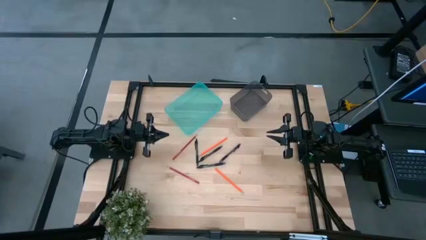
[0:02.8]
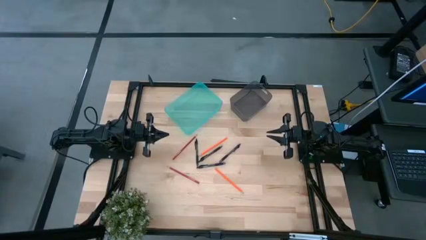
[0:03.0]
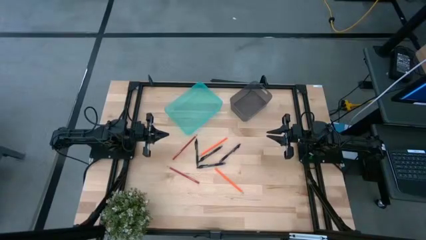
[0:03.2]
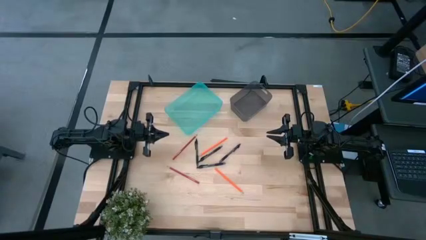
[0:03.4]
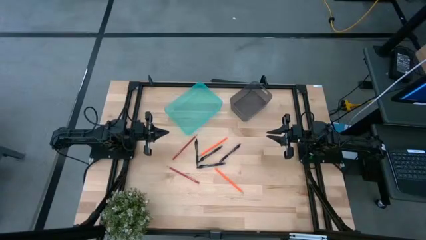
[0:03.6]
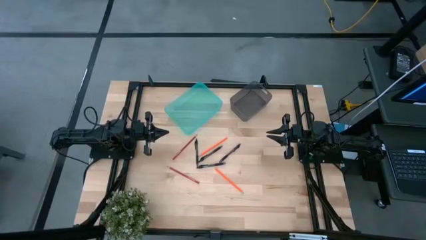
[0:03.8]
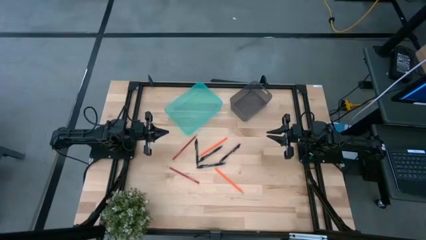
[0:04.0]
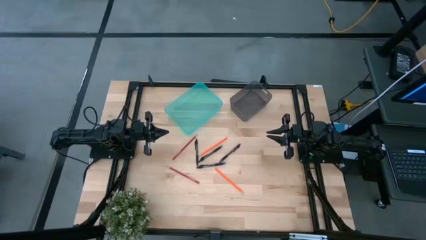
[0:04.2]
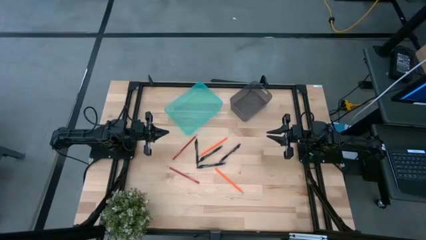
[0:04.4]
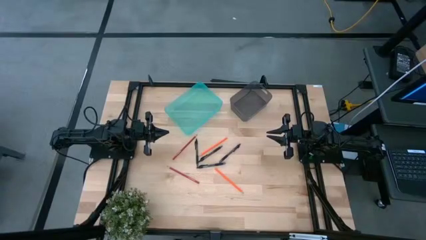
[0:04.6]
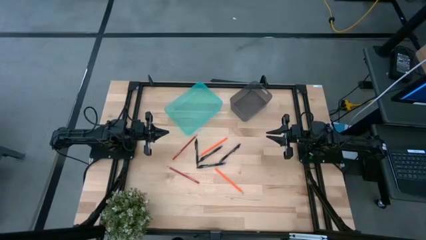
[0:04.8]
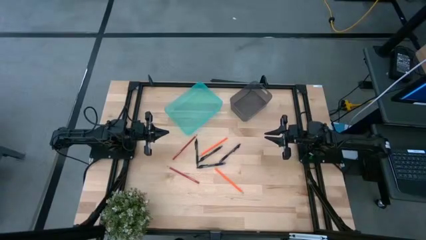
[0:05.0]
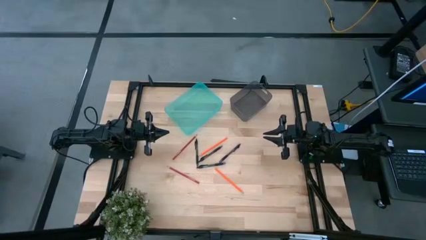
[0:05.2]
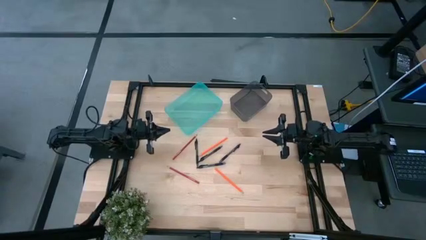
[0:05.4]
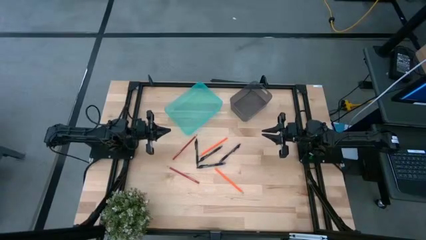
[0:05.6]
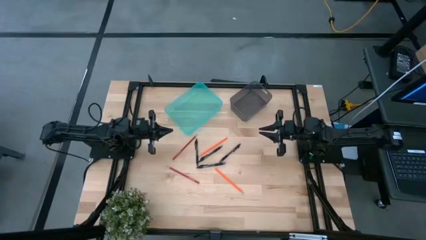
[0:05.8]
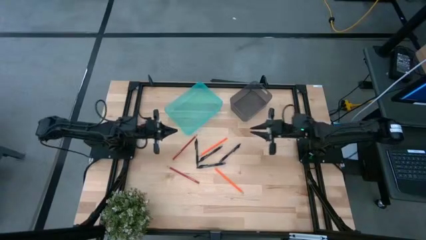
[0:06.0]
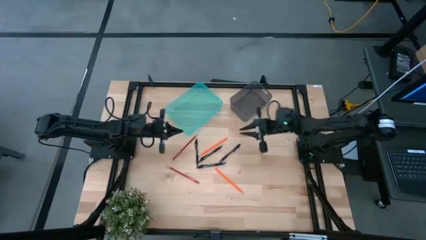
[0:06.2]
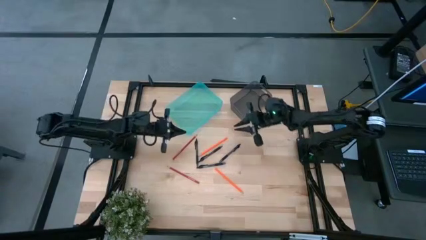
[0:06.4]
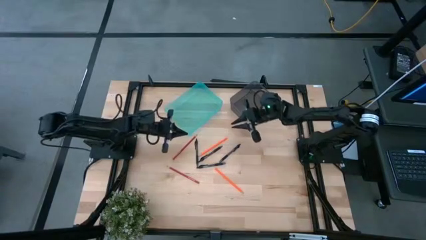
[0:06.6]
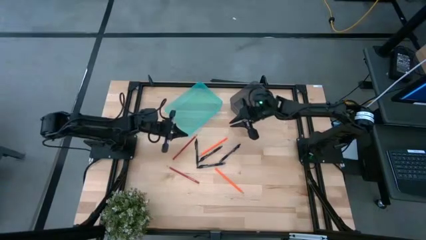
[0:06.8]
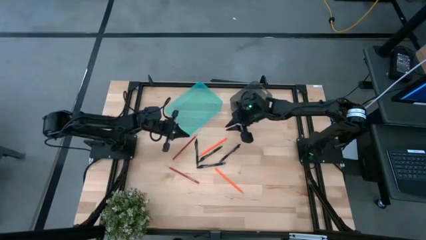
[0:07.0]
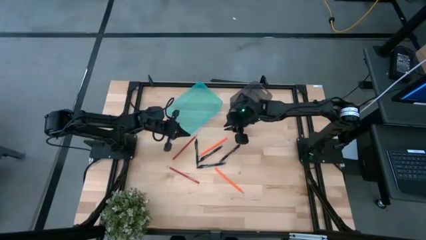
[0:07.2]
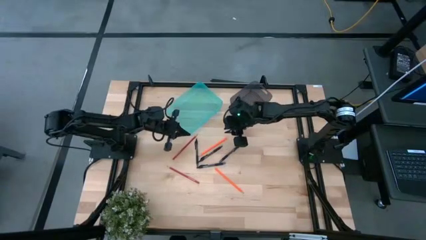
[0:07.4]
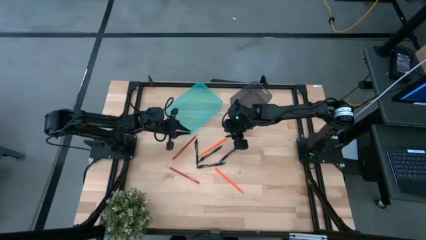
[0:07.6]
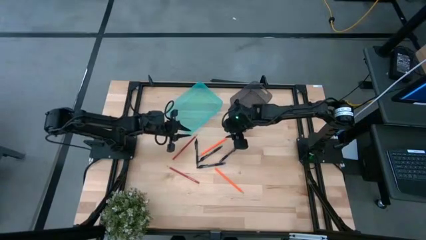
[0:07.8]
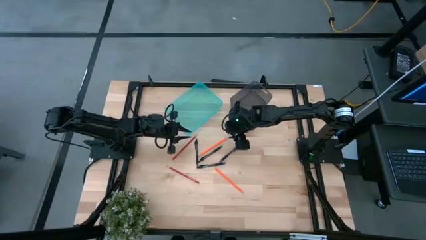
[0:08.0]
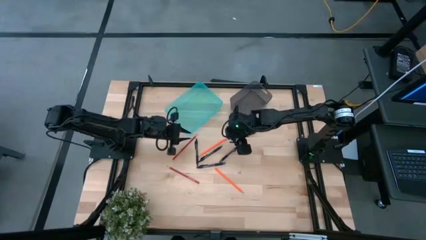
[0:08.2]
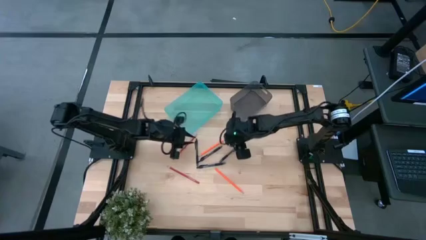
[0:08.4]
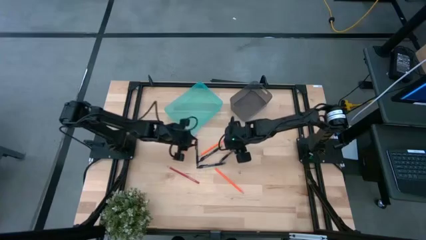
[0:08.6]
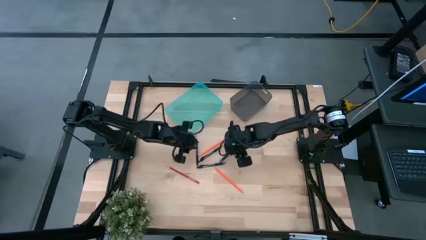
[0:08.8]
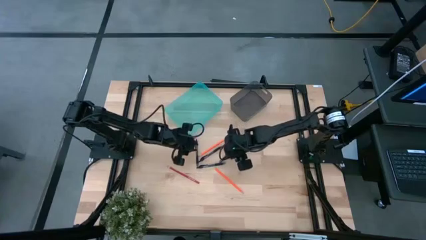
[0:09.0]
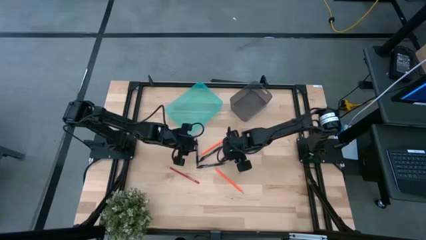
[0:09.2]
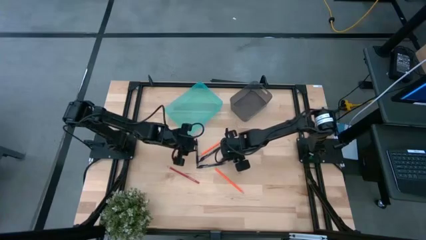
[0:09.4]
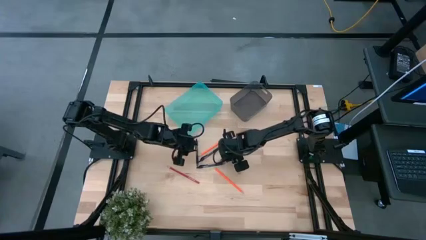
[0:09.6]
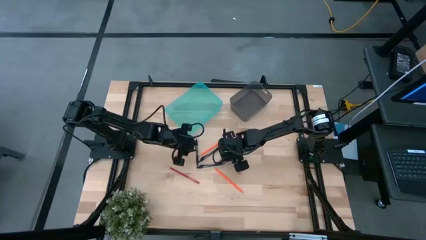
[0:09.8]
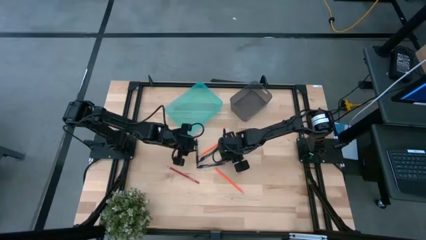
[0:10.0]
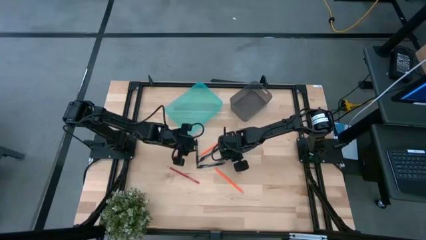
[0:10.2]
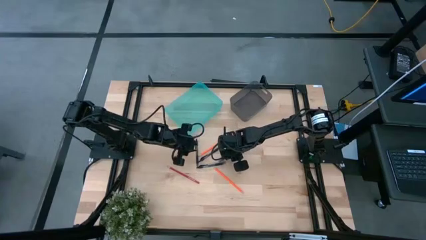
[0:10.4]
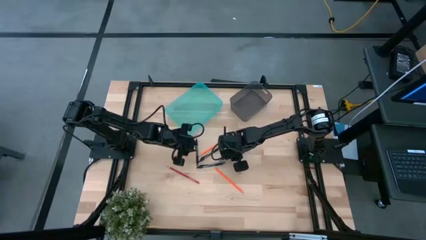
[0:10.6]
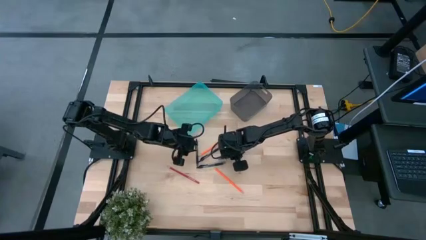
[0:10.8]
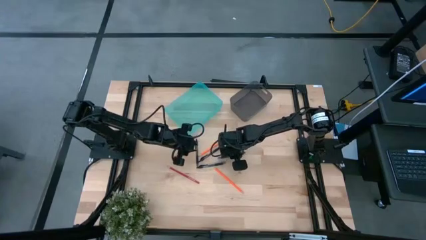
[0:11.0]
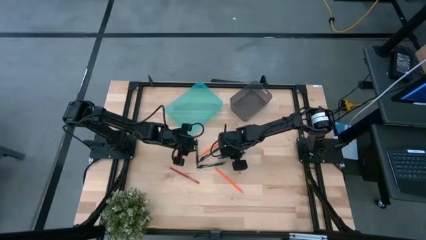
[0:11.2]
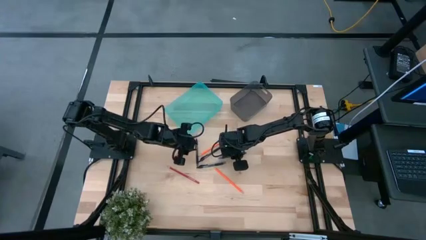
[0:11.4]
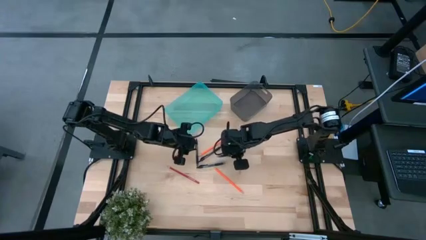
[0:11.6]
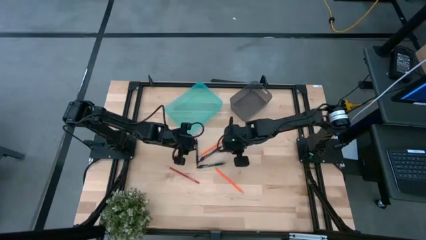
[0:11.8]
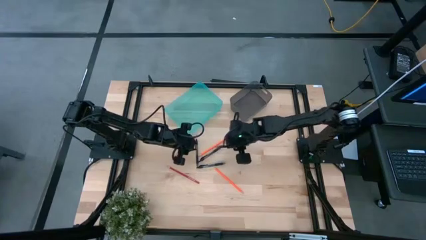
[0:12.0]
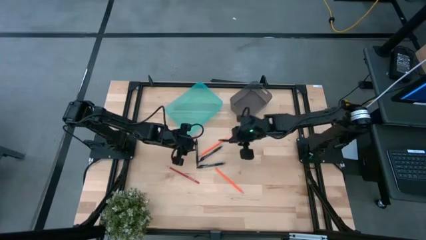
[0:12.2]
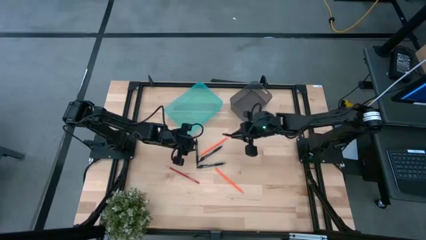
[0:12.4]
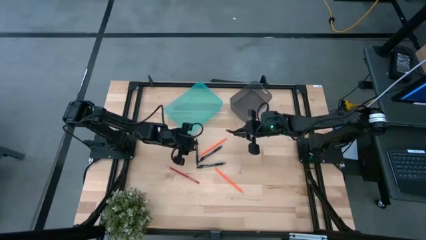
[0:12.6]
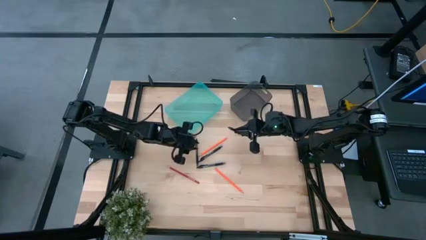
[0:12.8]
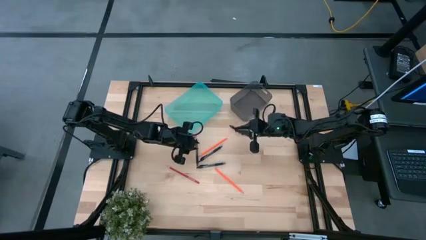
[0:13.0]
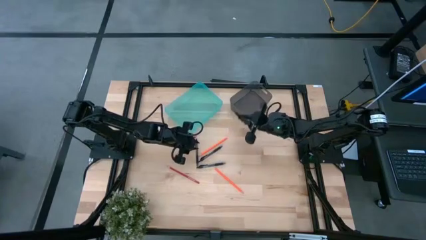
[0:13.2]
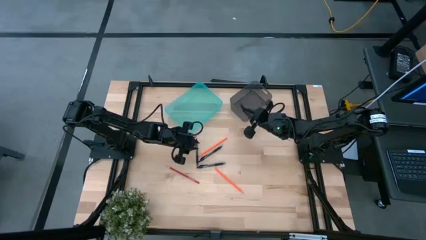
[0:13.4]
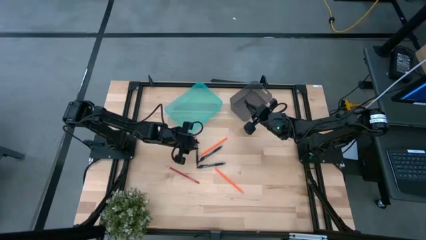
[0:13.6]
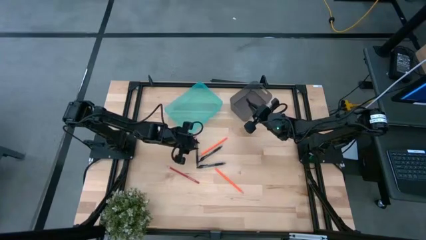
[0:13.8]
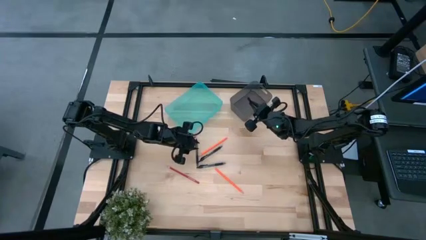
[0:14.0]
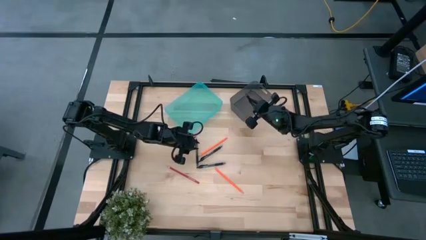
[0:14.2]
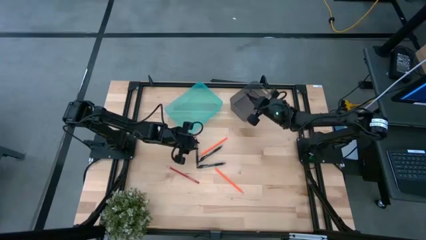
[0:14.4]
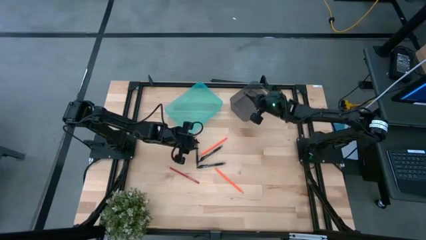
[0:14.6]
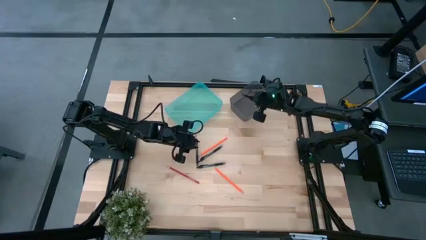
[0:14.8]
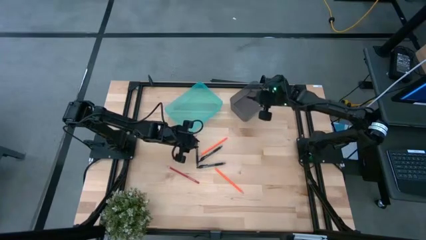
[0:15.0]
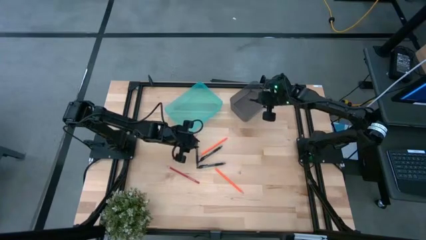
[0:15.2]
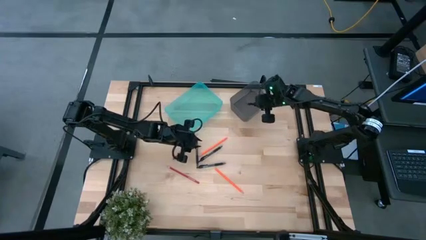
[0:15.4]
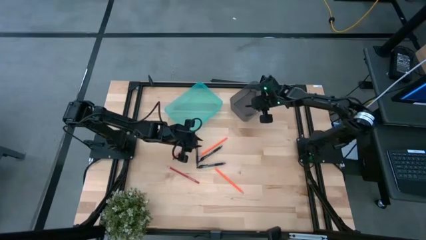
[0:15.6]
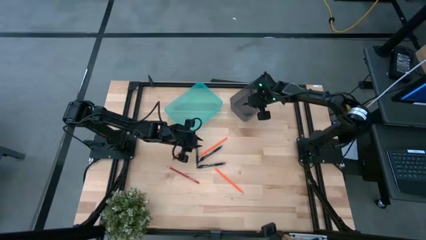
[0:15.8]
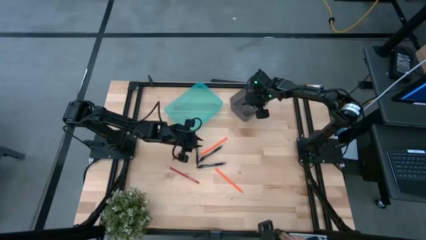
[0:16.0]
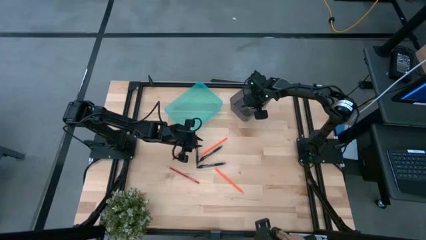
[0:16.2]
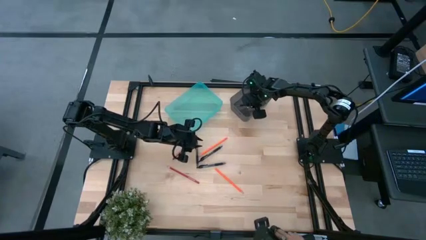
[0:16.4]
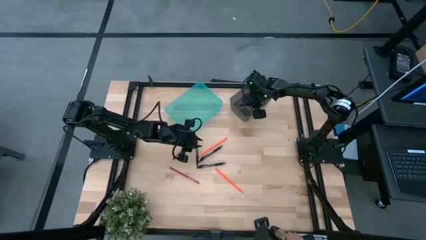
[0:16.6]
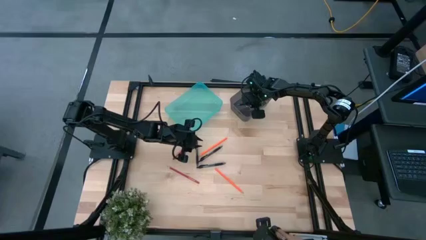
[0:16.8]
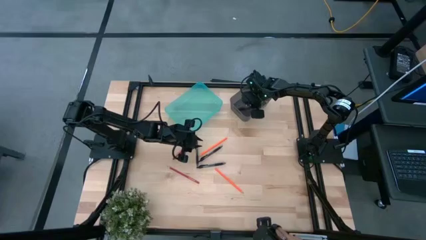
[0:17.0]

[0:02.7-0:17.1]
Task: Sort pens & pencils
Put the black pen into the gray bin
